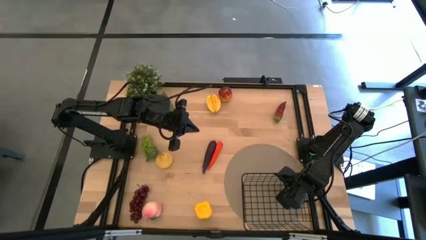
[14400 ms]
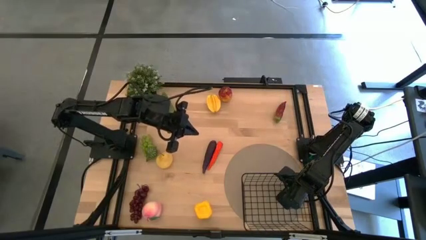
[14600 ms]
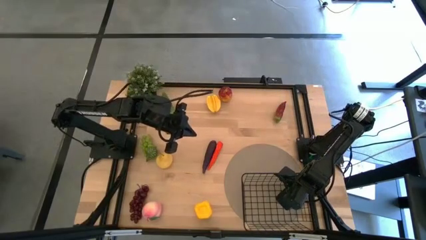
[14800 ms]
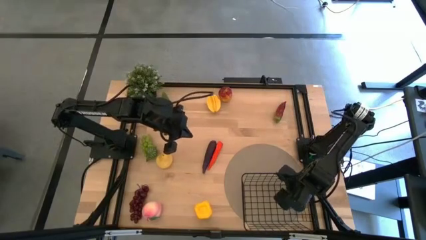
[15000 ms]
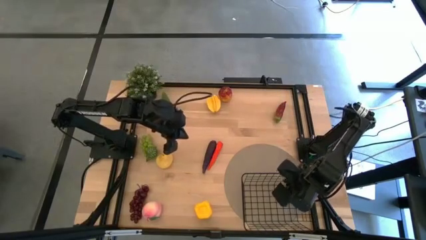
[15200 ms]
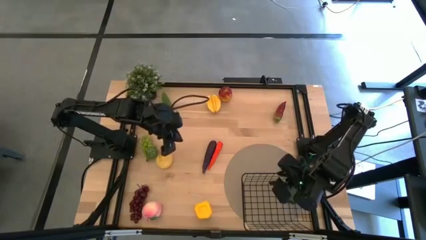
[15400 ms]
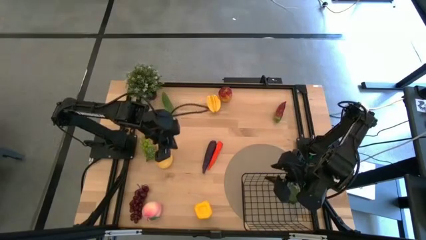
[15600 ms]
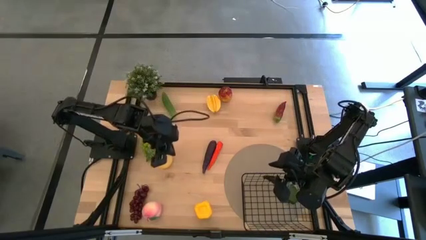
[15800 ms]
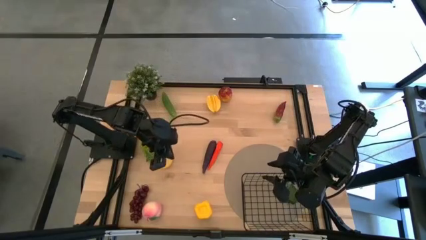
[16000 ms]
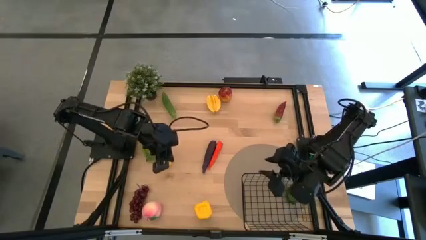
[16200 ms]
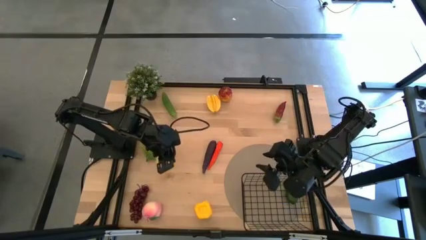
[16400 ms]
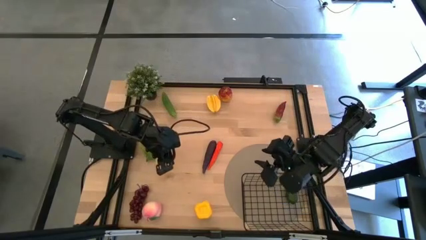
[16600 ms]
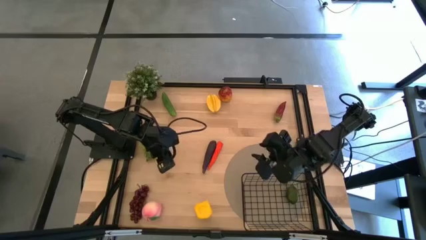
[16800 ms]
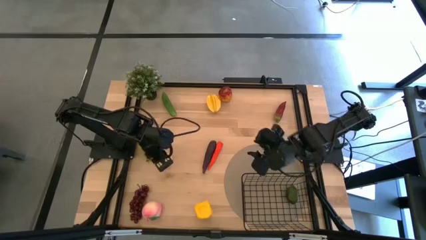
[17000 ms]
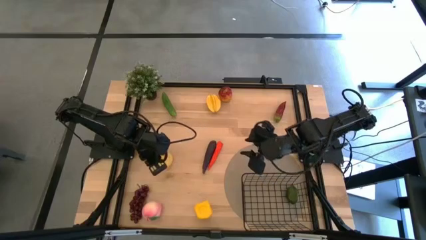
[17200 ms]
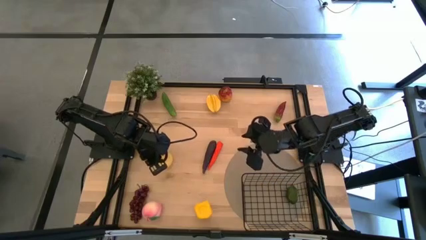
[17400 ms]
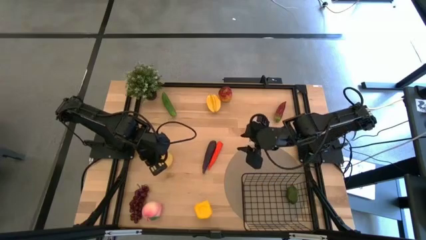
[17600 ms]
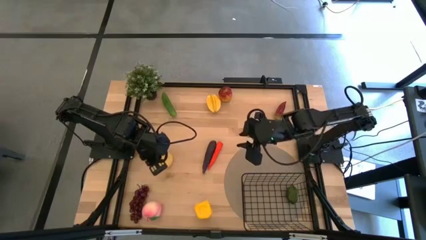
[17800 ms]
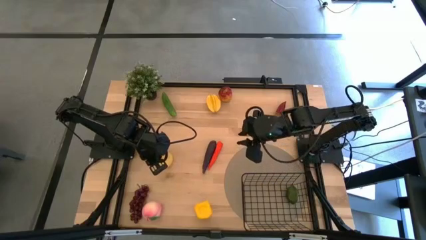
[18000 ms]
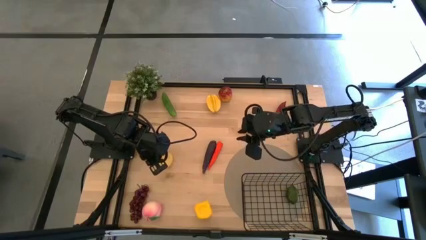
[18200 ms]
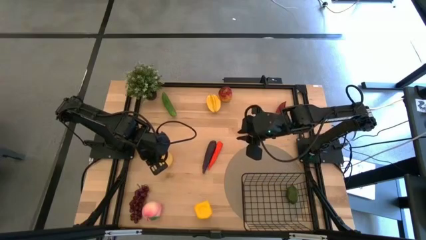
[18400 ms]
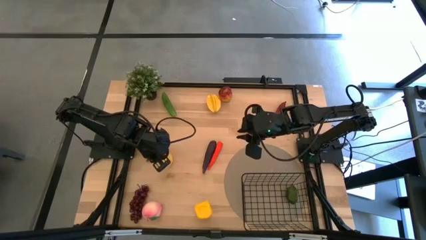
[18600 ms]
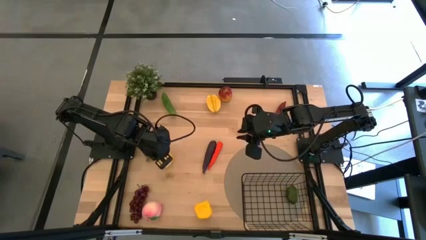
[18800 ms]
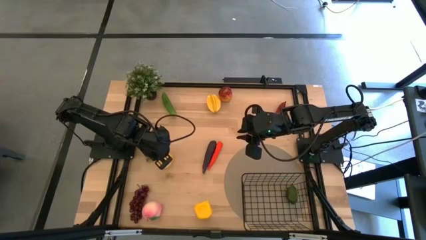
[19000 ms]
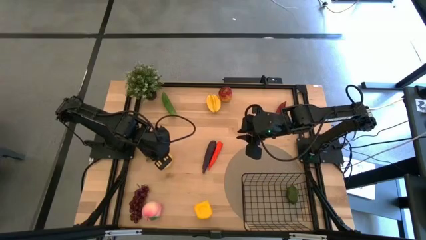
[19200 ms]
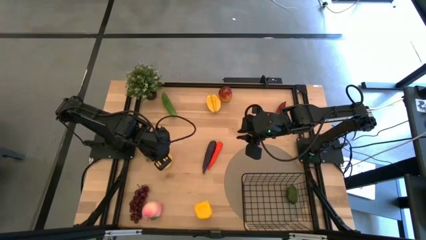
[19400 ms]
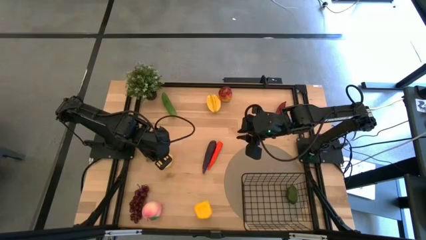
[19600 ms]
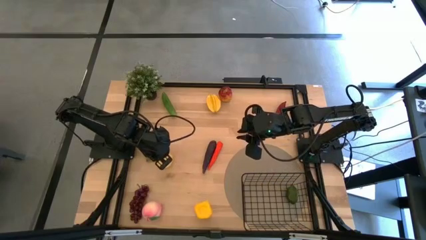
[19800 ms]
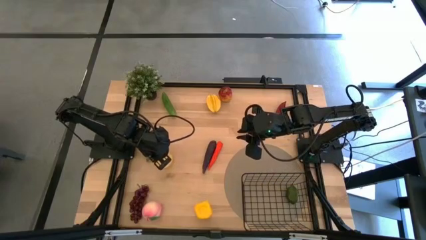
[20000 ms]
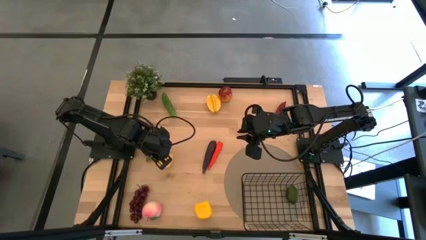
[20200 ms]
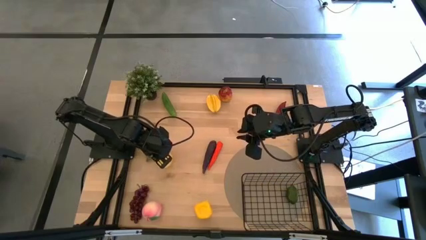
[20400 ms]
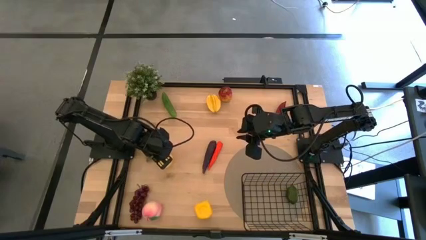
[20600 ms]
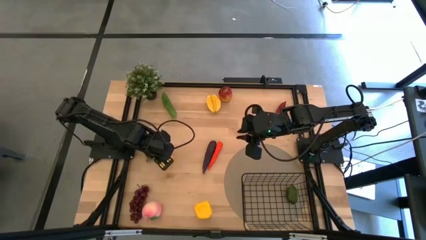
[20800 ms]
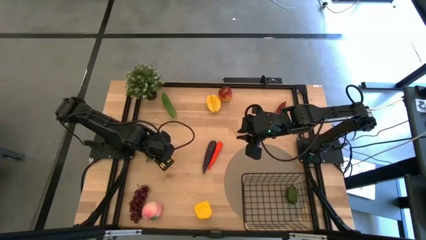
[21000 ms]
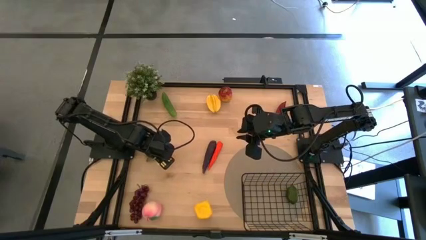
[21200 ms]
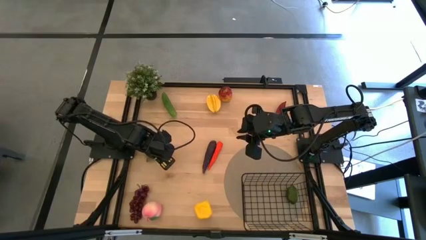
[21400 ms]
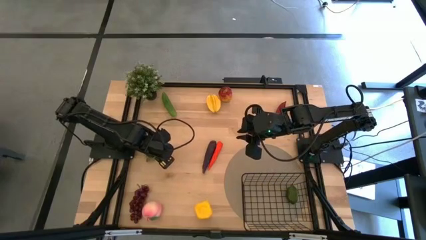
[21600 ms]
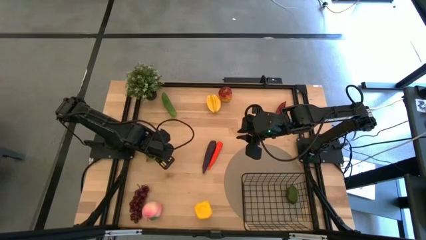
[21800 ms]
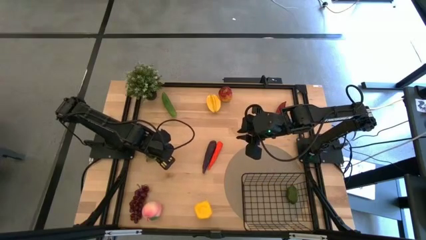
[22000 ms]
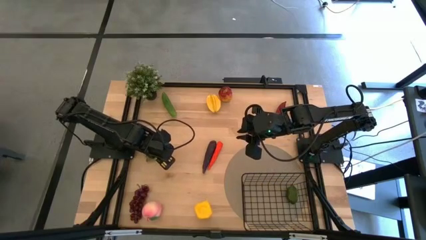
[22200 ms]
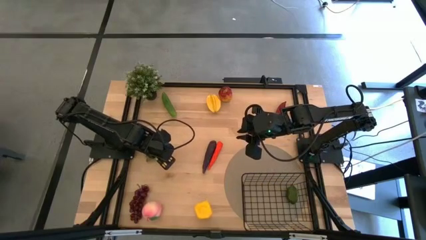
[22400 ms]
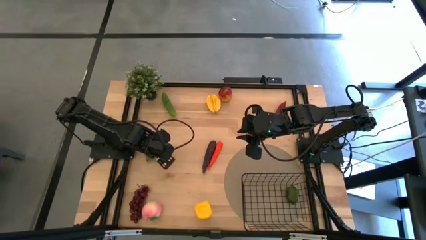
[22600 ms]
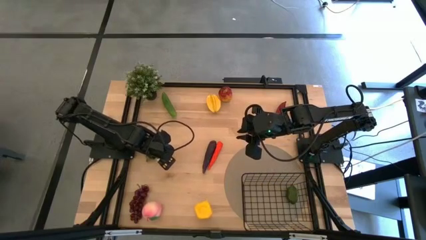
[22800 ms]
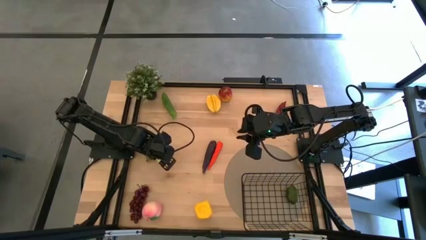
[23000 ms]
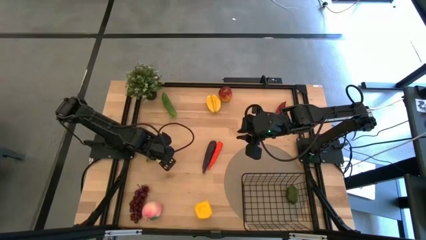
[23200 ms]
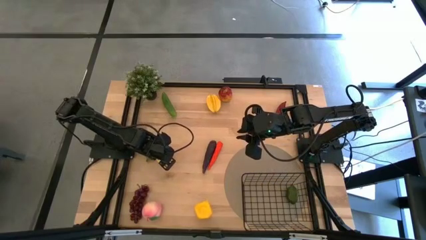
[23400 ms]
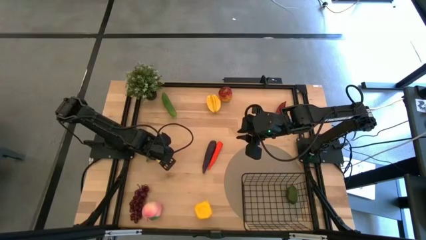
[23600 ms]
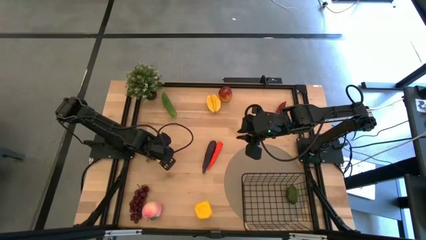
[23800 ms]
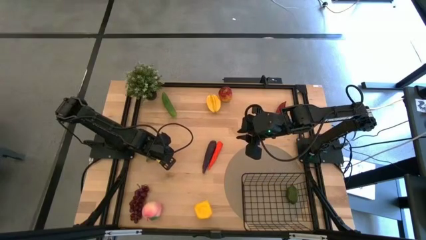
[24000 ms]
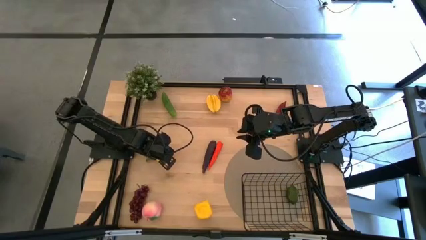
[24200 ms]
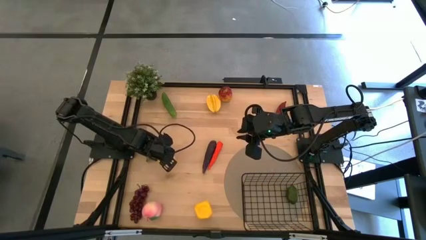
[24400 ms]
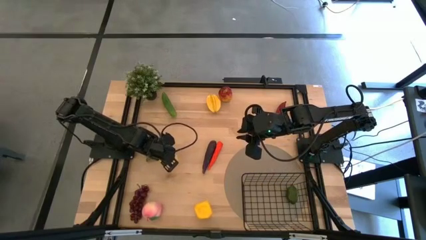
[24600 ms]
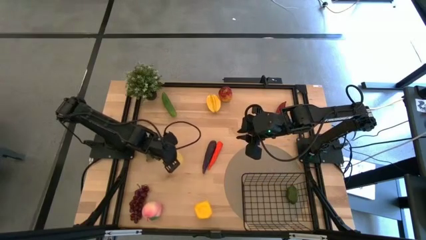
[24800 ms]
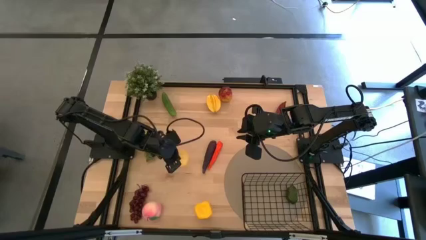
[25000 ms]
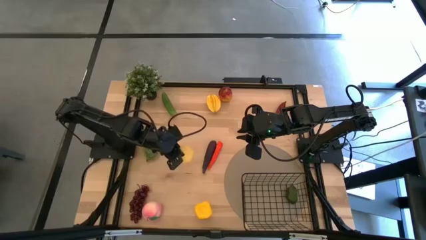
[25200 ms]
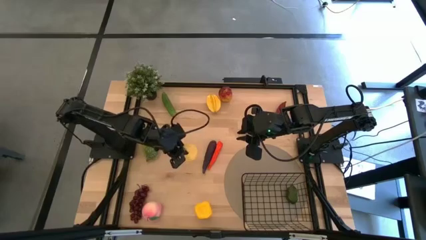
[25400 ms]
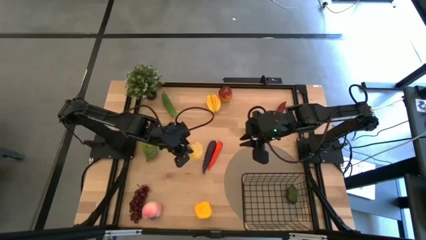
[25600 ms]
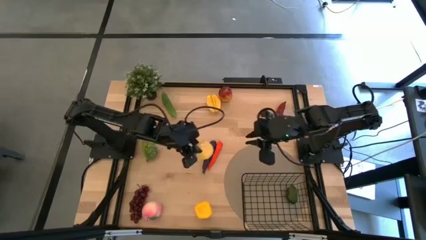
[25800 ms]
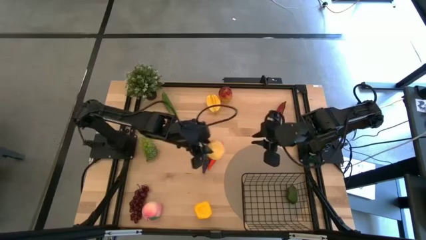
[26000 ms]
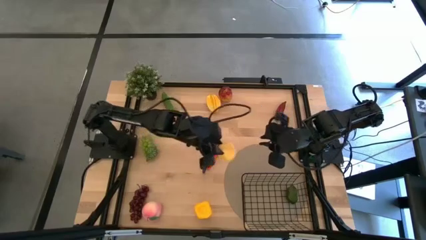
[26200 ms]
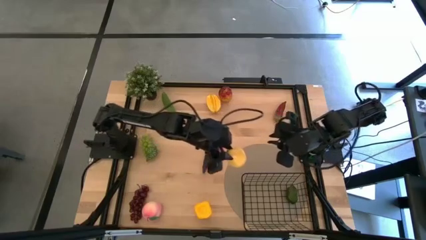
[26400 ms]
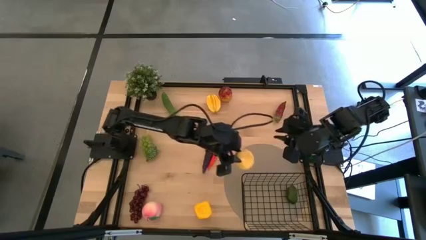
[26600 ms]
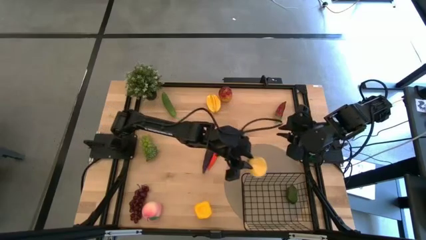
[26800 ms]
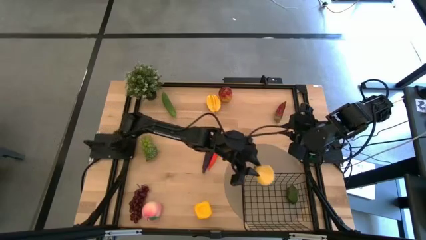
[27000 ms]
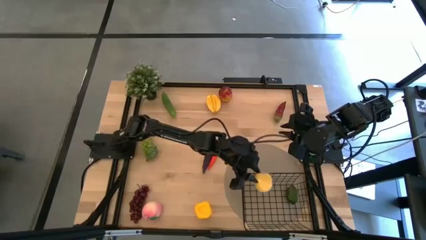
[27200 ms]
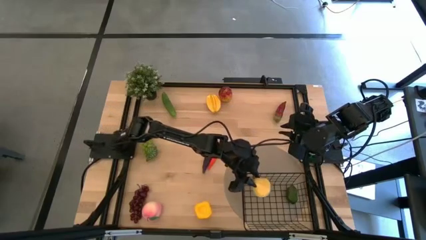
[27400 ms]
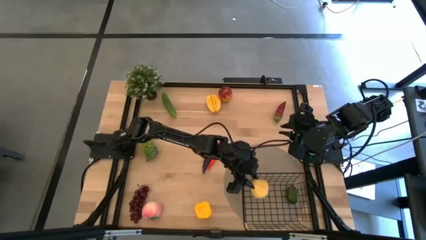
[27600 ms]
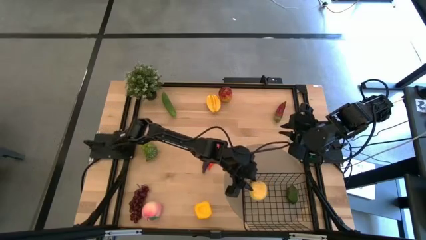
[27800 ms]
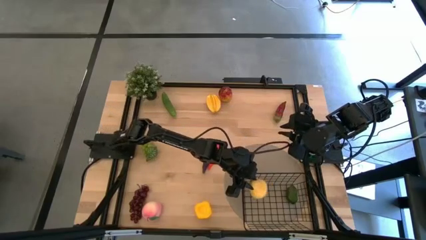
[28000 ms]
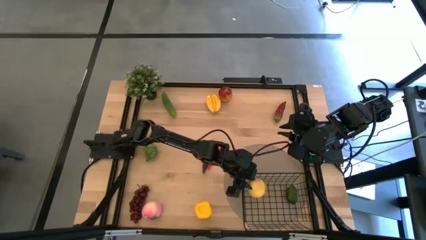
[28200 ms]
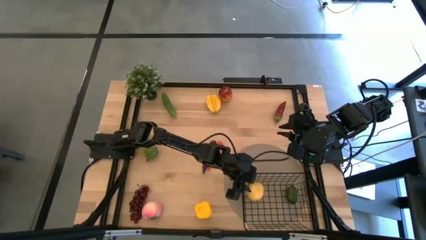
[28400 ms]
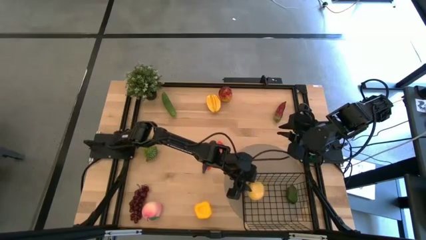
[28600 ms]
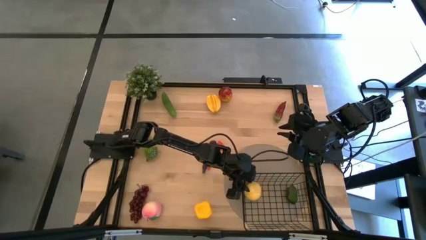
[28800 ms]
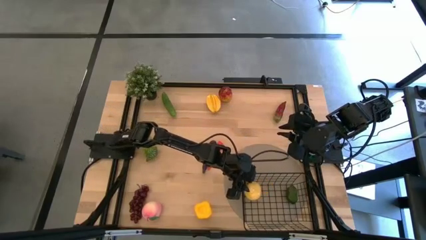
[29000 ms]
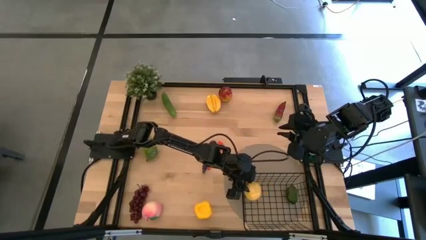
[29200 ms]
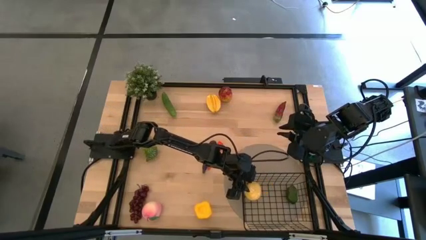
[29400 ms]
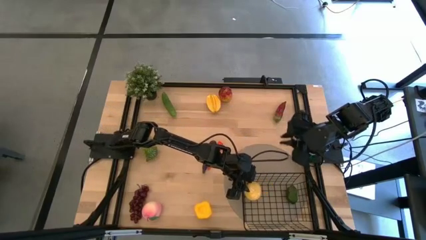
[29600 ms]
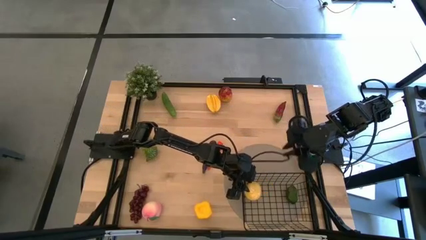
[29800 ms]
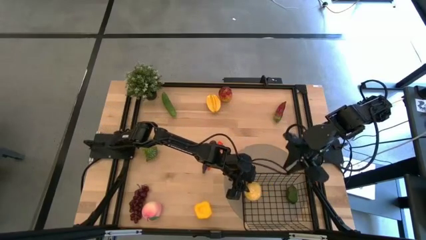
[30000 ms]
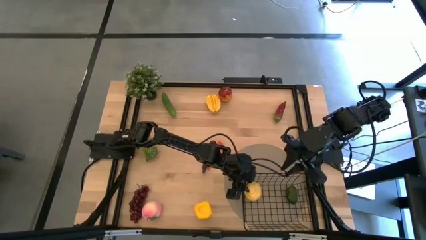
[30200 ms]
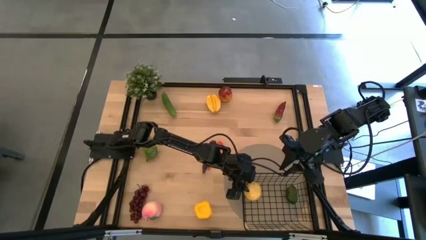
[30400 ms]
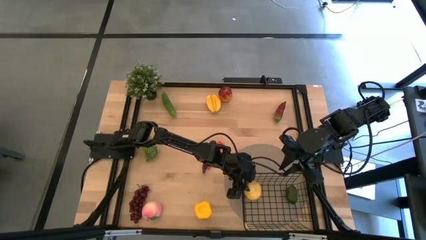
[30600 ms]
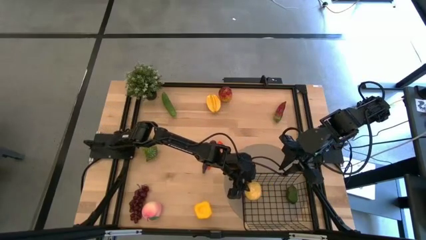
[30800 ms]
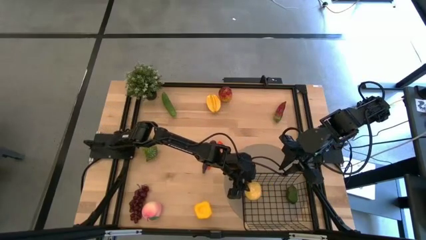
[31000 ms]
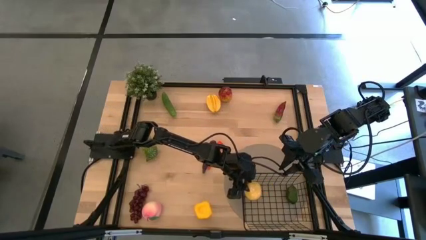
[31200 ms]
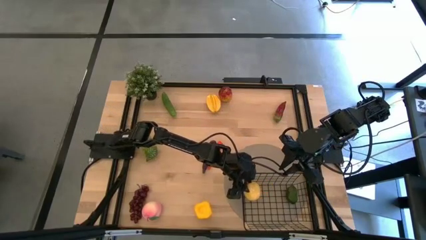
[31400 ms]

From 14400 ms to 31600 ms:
Task: Build produce basket
Put the yellow pear into the wire basket
